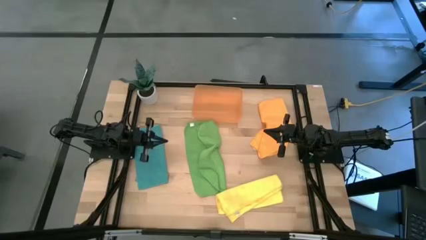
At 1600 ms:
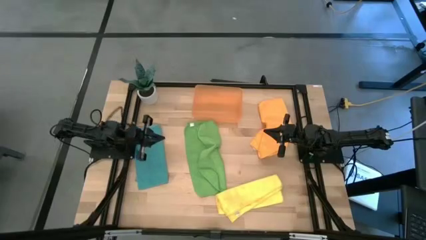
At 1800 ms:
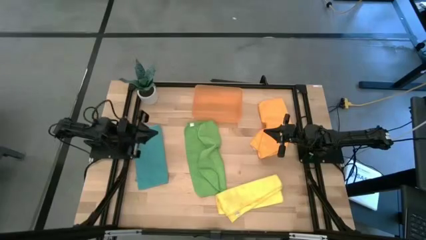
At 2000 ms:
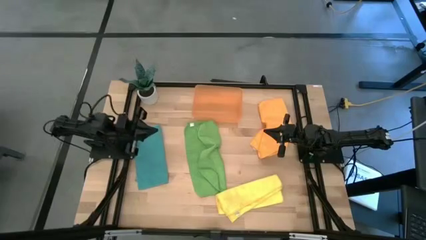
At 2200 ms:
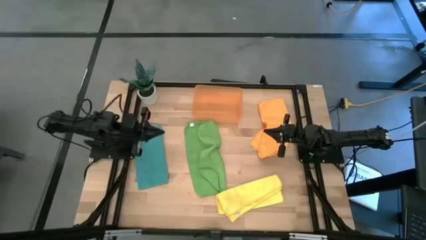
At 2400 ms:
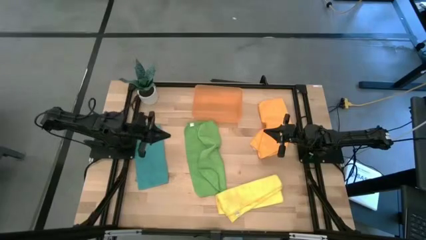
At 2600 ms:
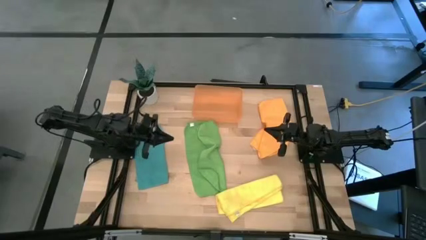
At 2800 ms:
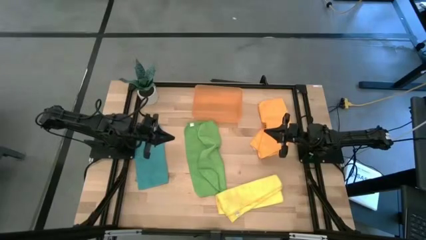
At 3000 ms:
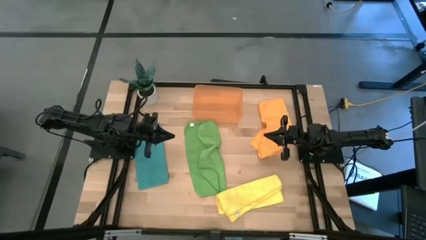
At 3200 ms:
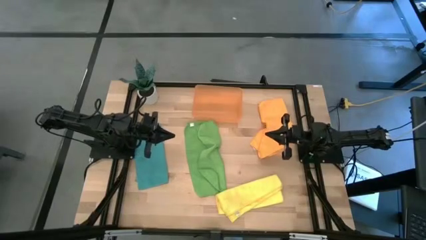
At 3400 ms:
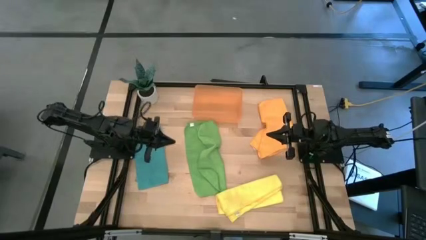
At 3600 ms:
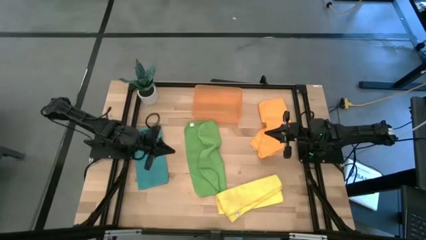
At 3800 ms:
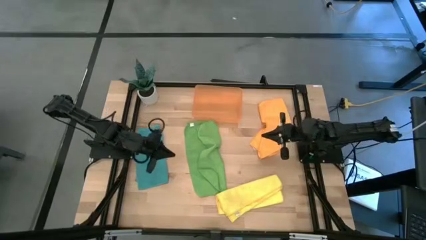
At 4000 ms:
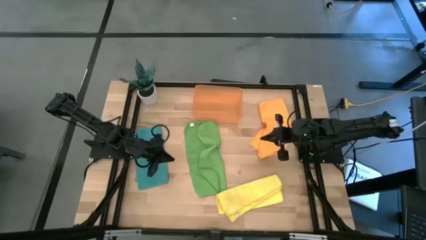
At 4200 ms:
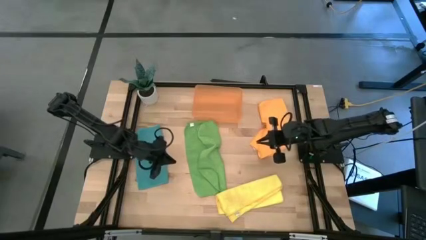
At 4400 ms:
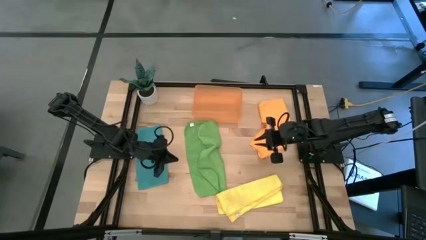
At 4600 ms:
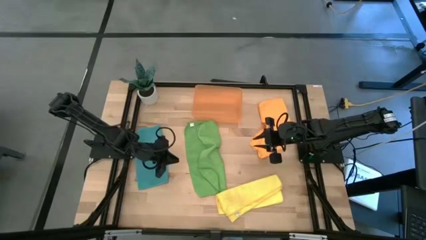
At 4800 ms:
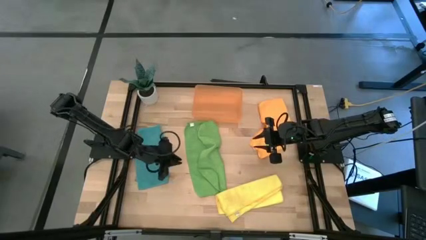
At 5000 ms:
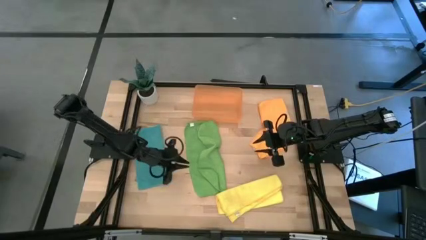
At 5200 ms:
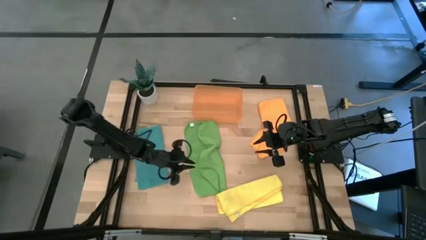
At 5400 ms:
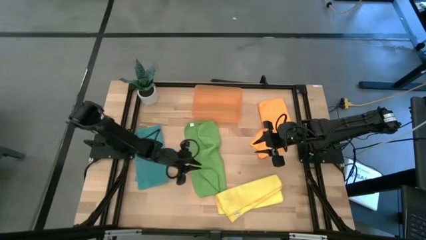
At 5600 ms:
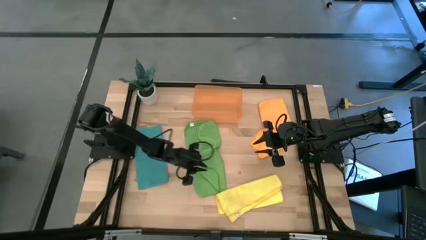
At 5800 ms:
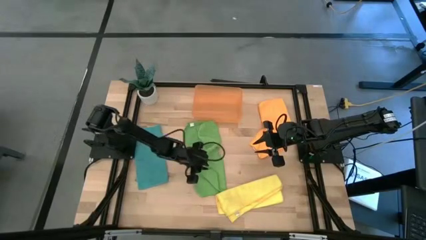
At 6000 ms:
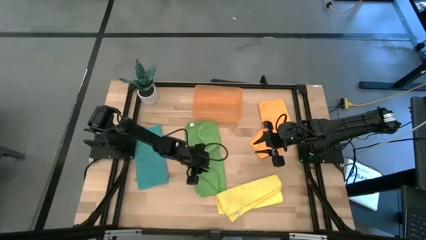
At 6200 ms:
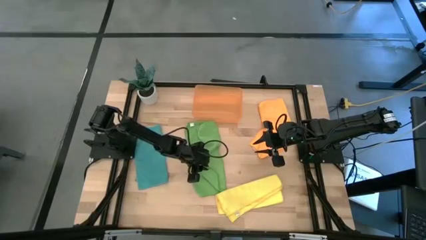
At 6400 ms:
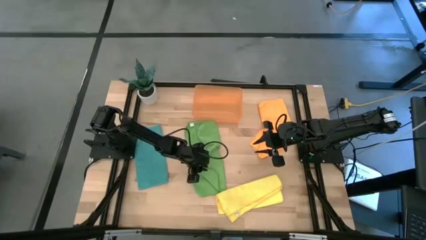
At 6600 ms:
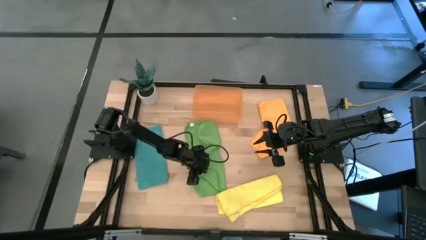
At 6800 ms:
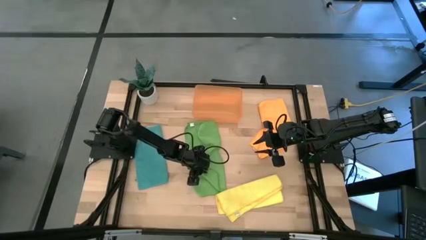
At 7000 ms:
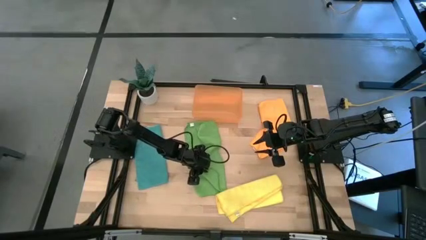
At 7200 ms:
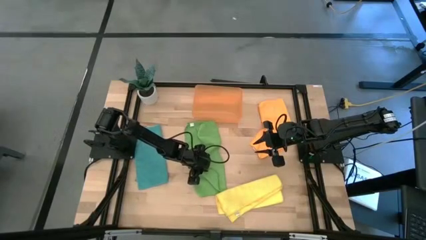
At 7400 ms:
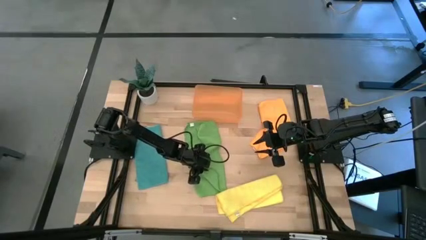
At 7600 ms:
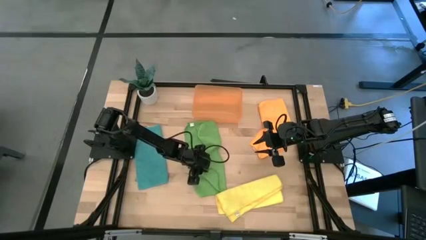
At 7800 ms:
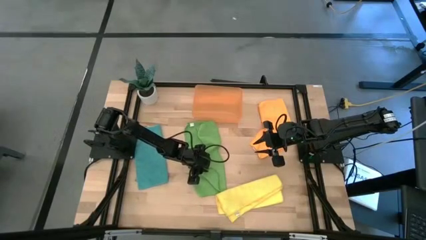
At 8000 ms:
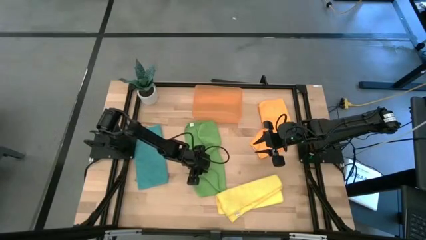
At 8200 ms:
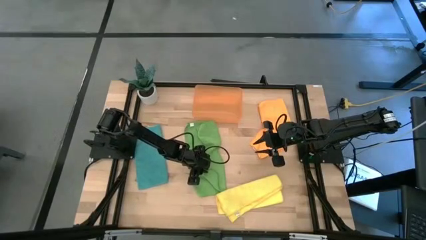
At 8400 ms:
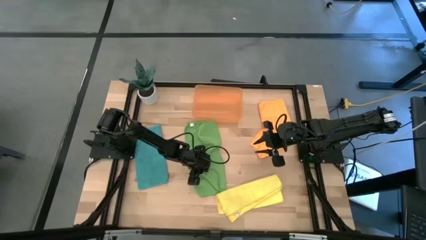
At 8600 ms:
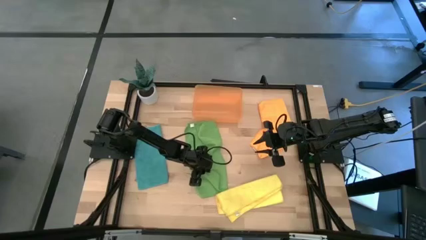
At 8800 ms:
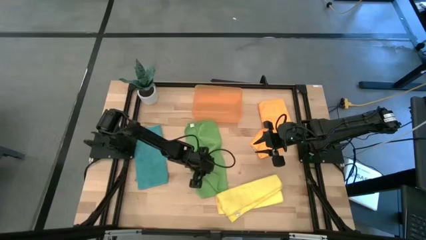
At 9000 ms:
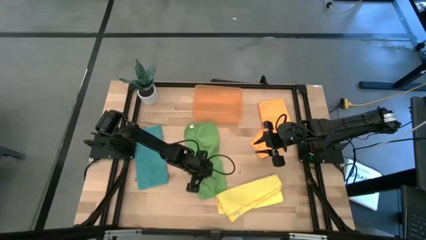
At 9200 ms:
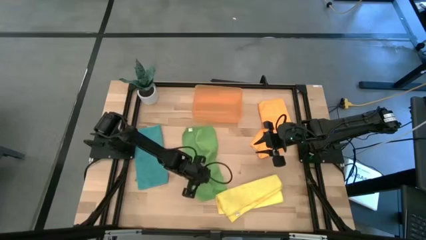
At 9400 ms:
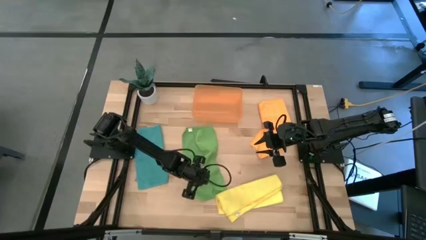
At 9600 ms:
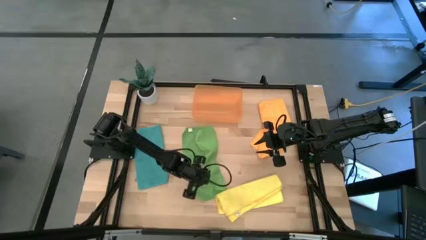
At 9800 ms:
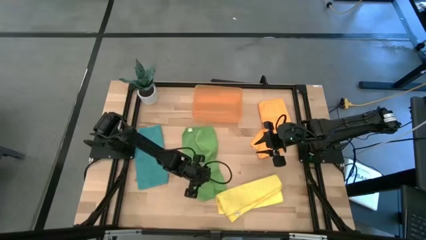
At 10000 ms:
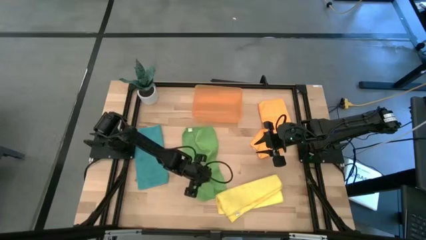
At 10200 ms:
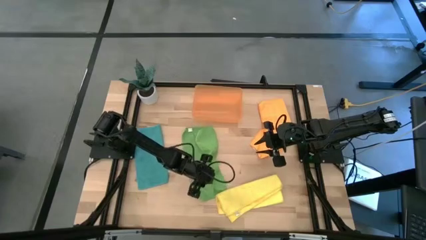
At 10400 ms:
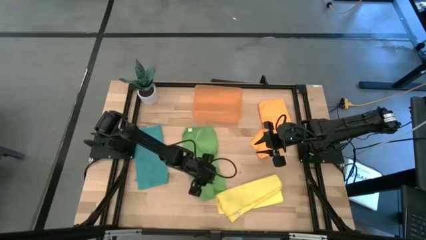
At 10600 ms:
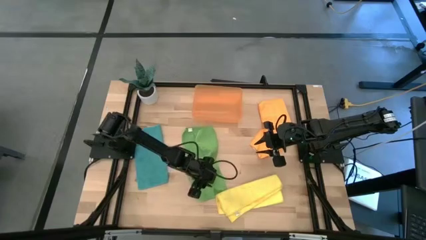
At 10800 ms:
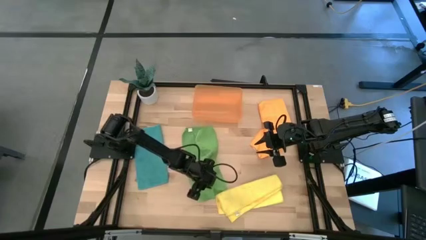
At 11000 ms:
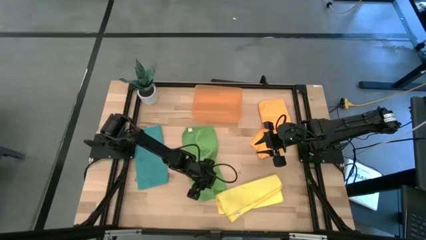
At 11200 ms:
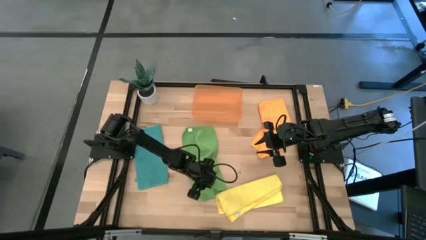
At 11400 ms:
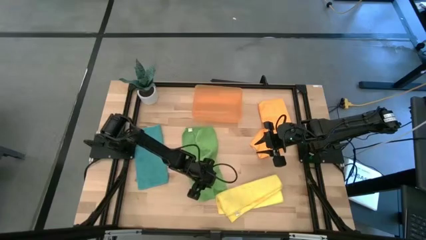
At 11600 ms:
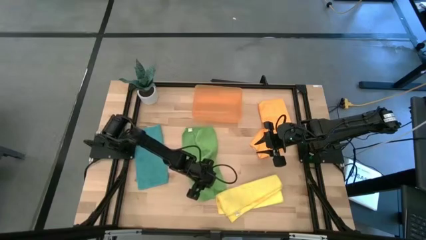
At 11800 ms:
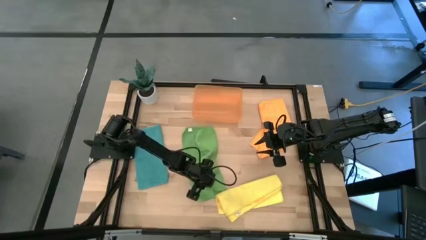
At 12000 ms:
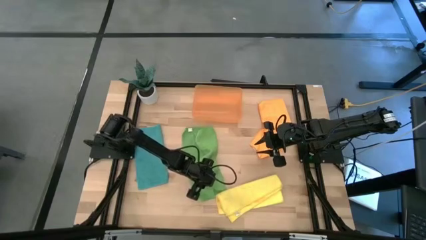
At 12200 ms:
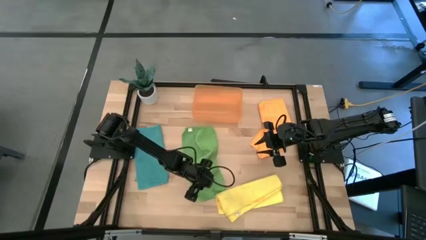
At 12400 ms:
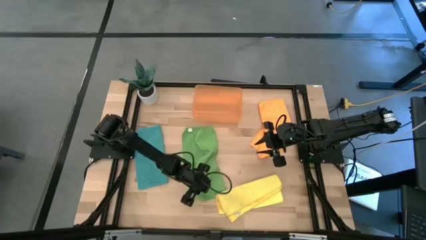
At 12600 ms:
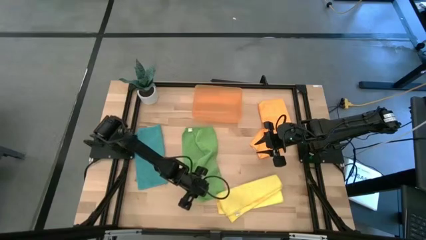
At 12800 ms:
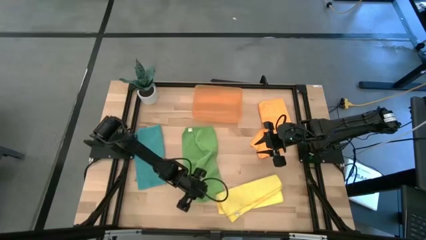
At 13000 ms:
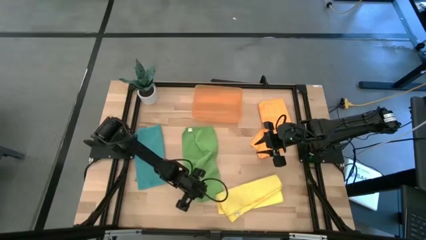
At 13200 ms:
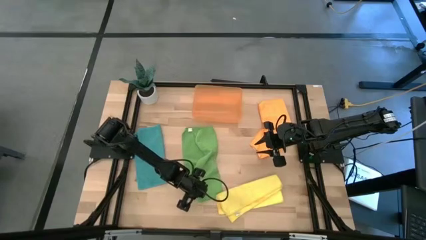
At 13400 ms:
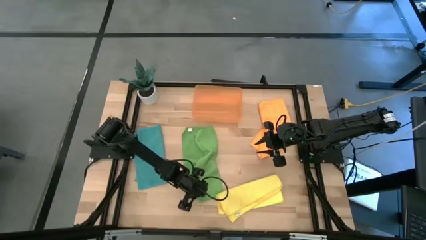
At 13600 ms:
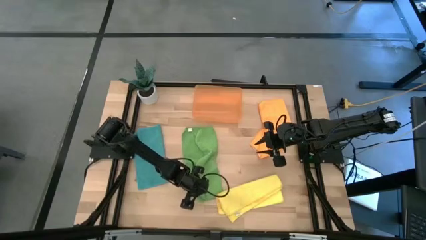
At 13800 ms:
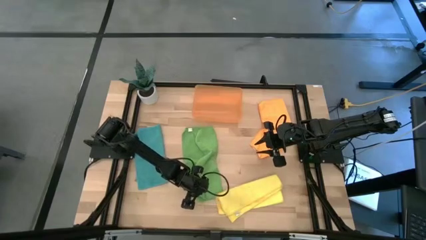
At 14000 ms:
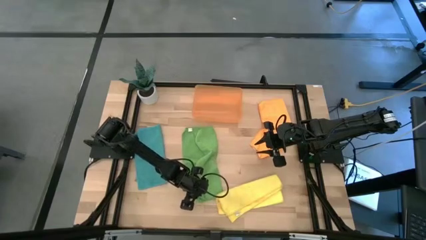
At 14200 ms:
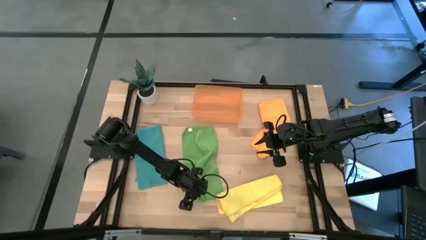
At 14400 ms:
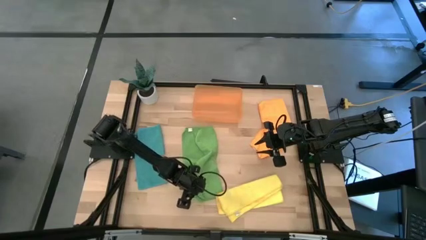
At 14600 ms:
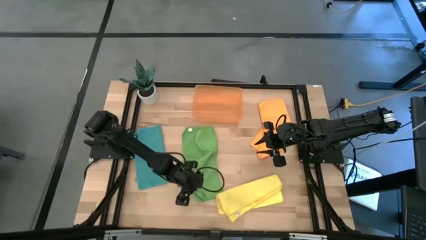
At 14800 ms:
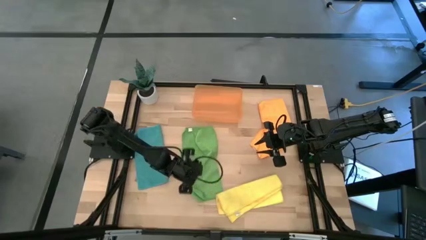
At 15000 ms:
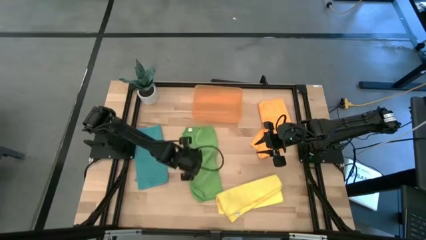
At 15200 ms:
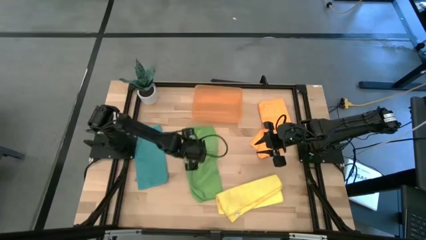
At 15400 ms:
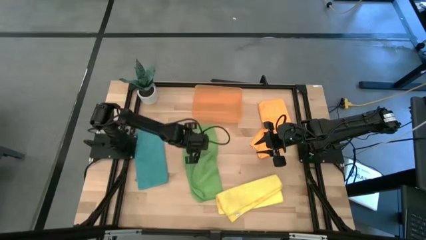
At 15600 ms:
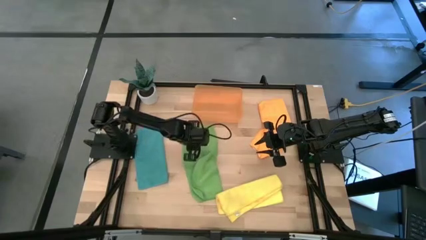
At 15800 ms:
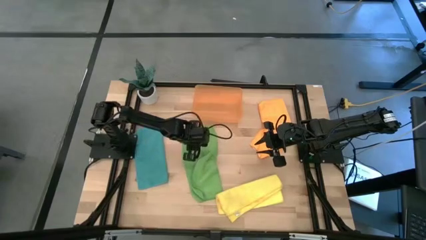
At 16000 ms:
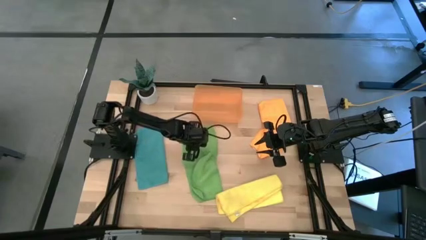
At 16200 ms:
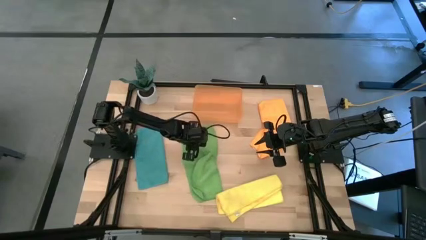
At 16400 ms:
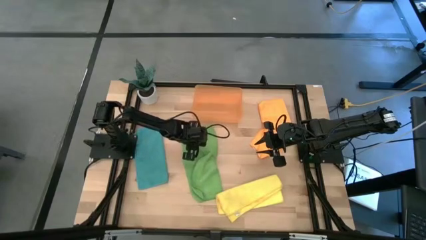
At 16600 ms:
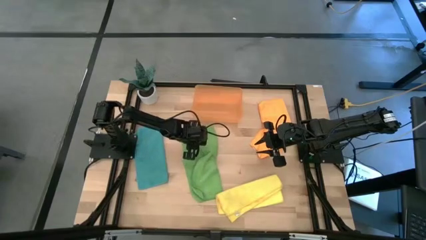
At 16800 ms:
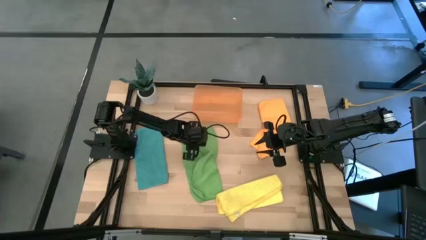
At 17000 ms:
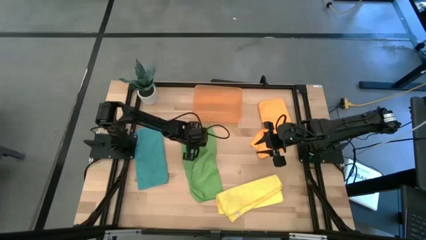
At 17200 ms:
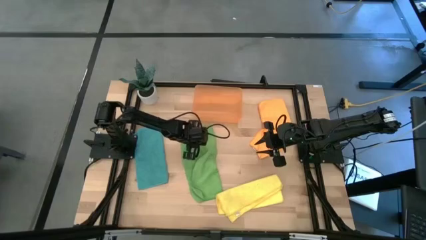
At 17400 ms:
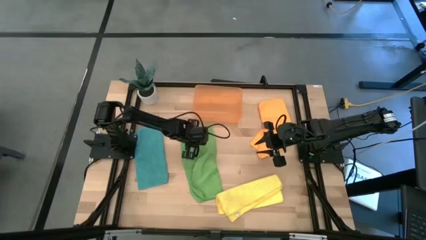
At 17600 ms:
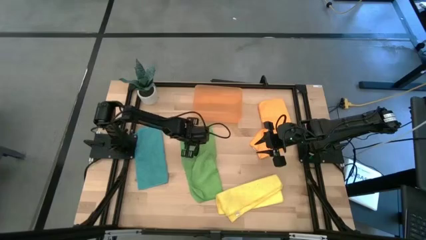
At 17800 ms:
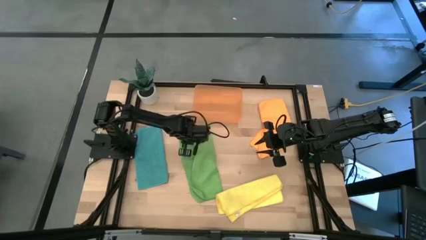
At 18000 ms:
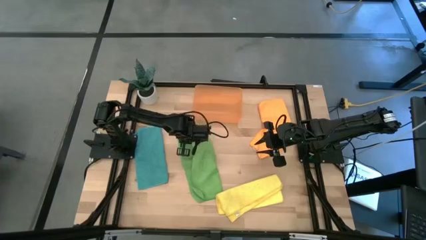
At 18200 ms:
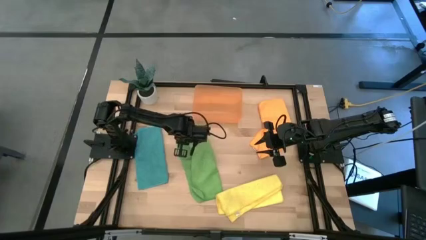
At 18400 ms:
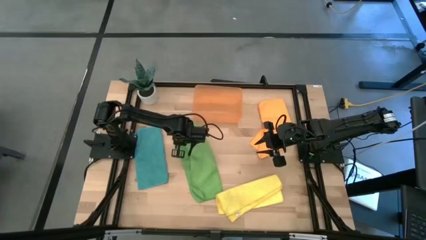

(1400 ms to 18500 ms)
Task: Roll microfiber towels into tight, uniform cylinder then place into a basket
Roll the green microfiber cloth
